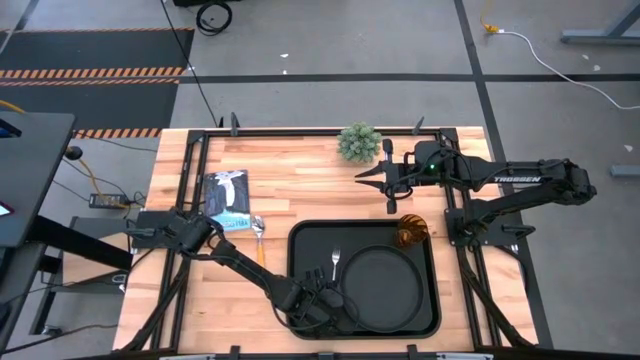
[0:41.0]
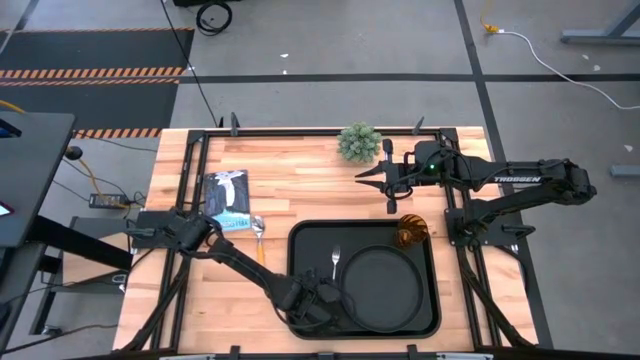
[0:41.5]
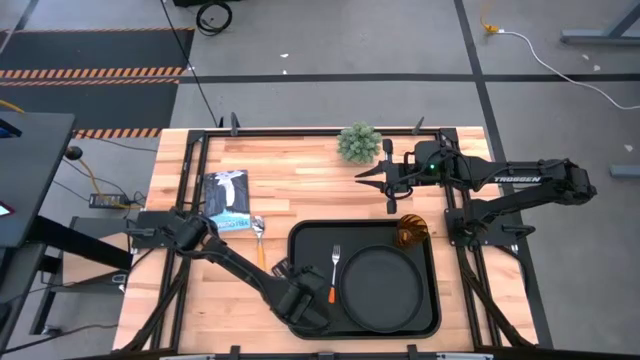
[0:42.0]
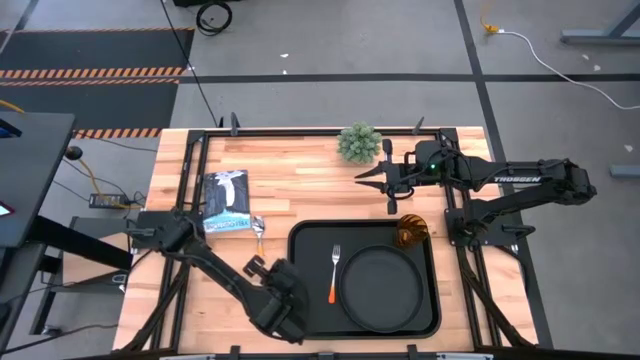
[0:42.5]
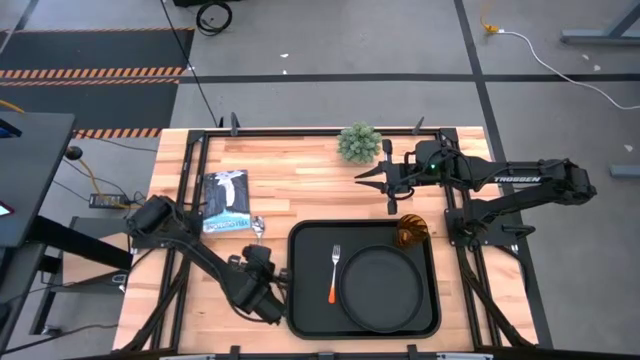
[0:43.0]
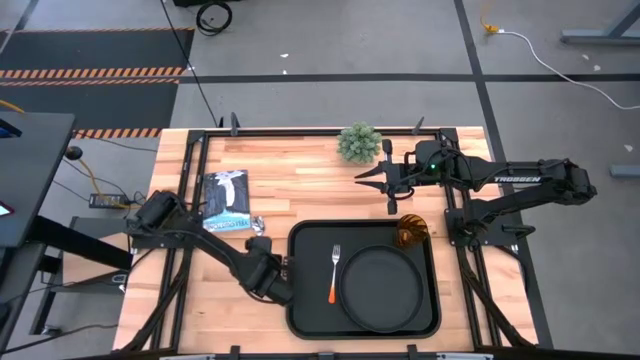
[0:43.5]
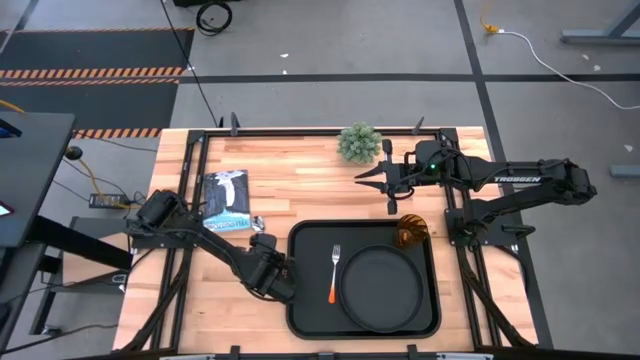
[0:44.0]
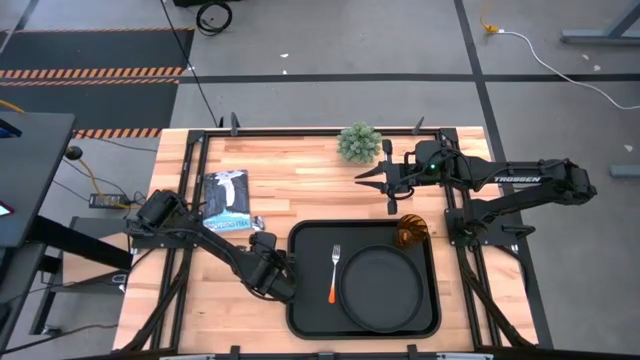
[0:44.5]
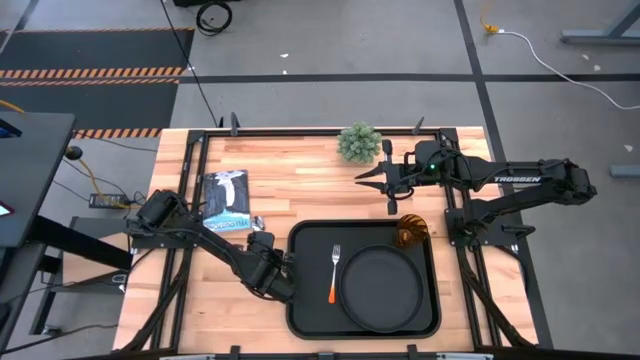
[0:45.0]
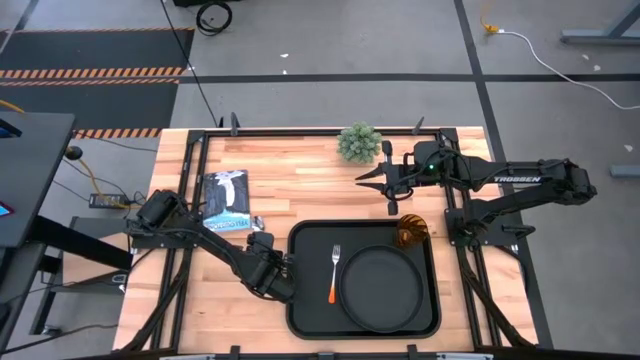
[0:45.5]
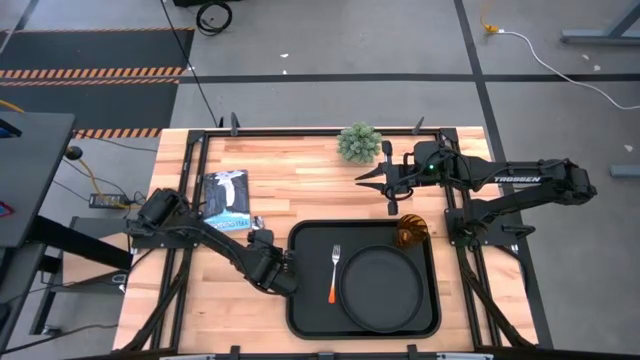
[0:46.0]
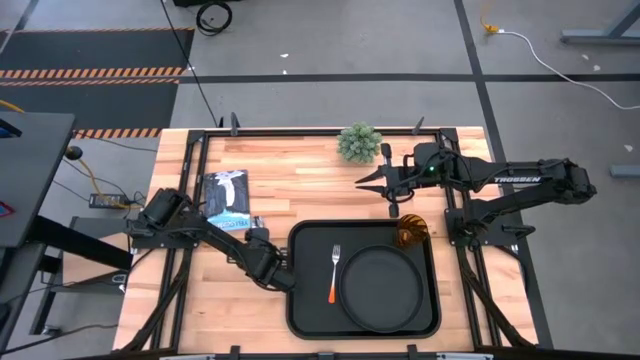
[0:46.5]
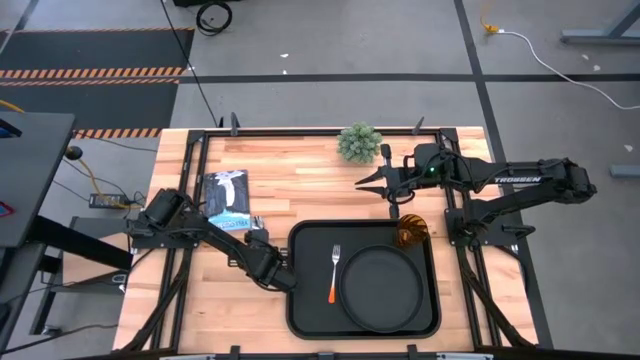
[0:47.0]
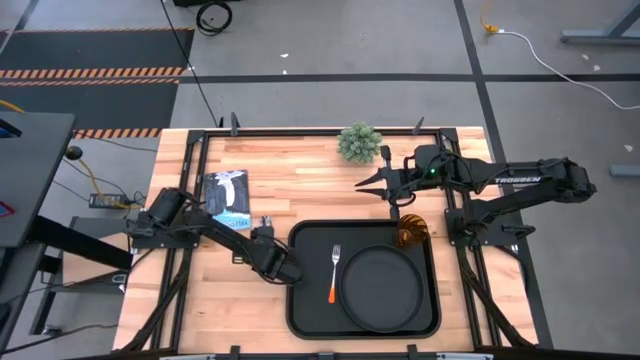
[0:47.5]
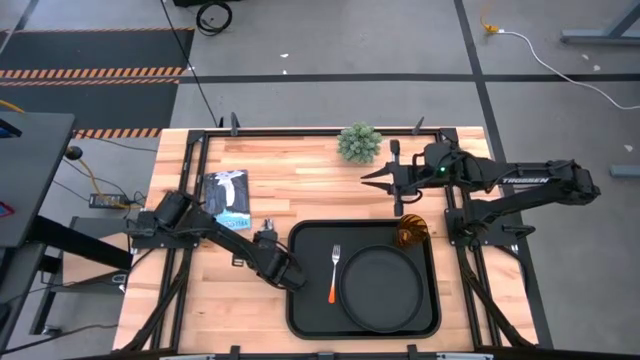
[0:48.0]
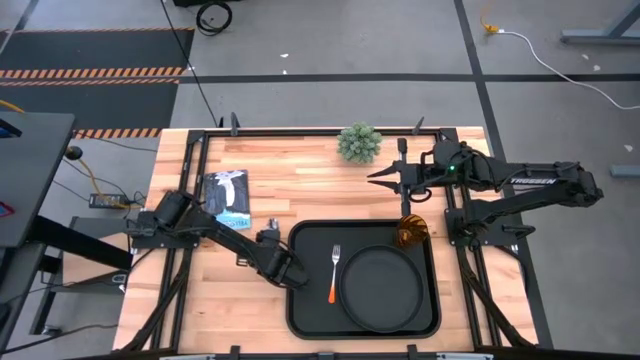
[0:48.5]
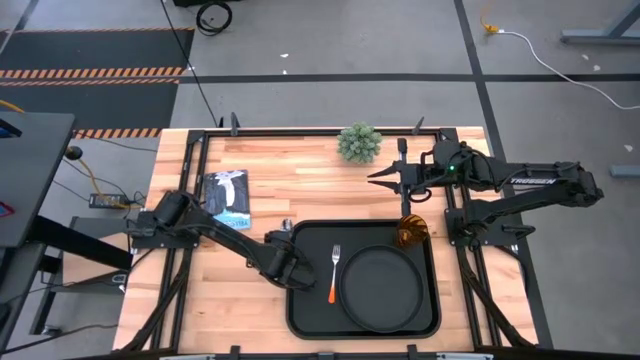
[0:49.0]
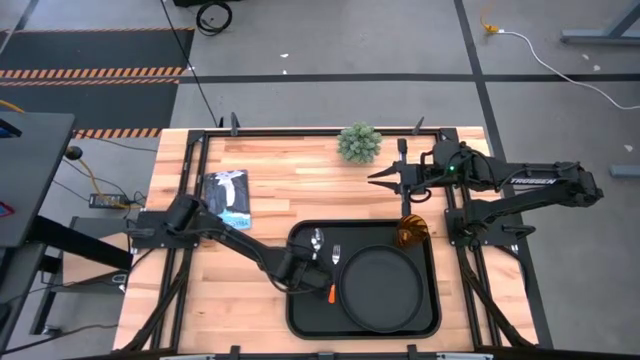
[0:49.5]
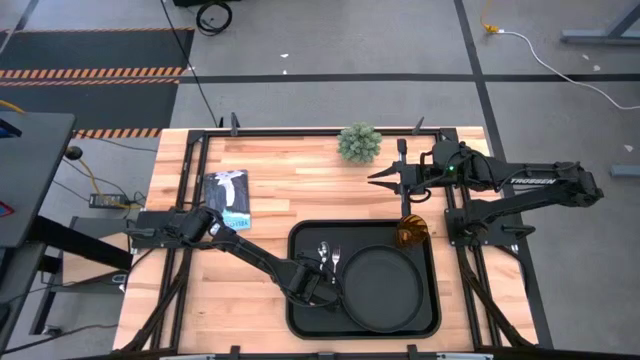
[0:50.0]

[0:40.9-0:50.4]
Task: Pick and place plate/cup/fork/spoon on tray
Put the orange spoon on the black tray to the left of the orange fork

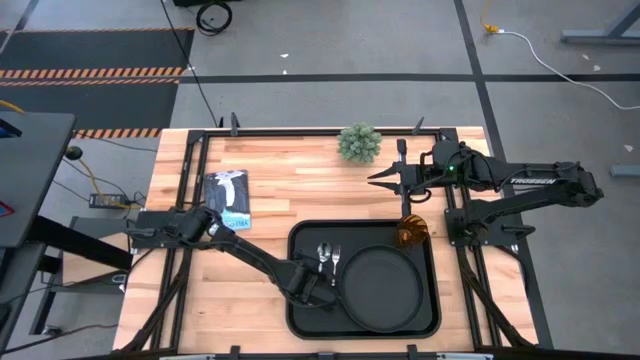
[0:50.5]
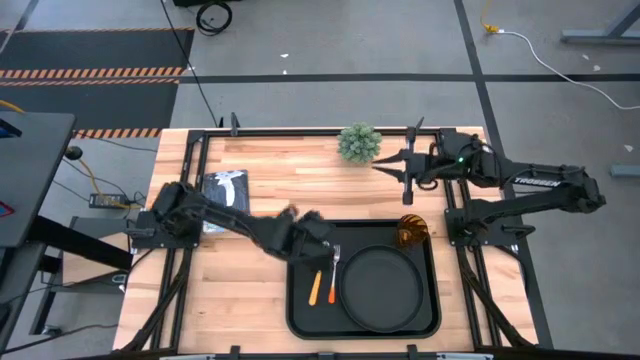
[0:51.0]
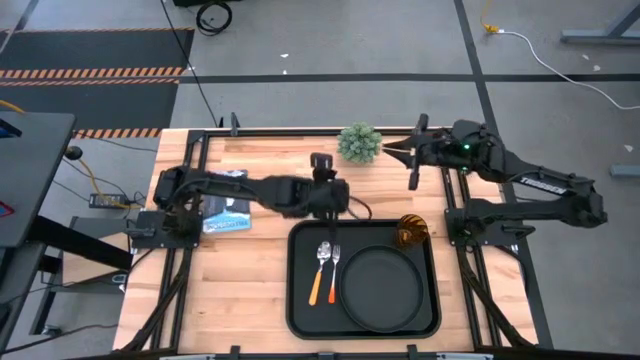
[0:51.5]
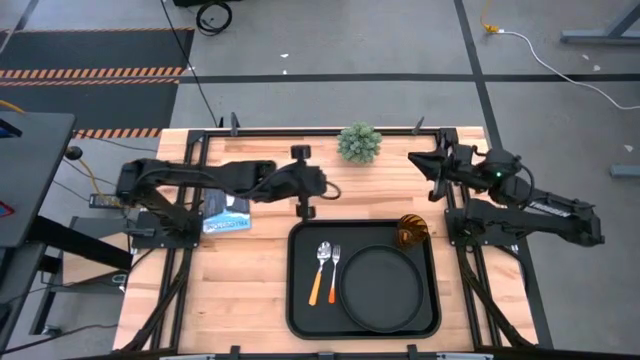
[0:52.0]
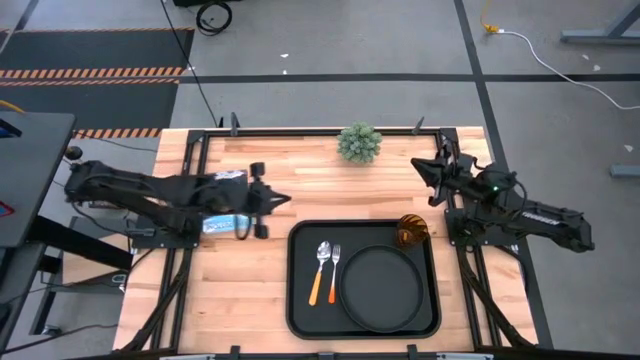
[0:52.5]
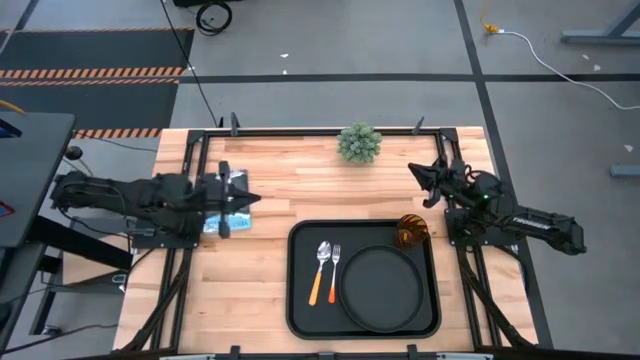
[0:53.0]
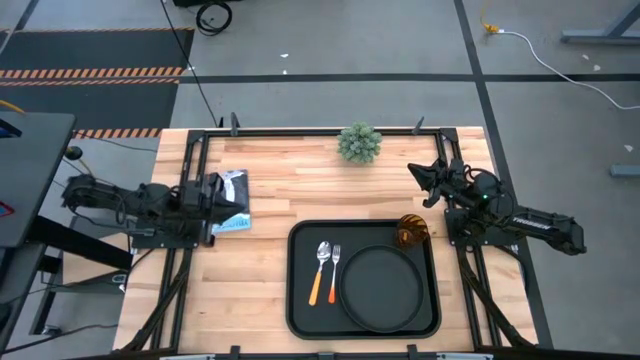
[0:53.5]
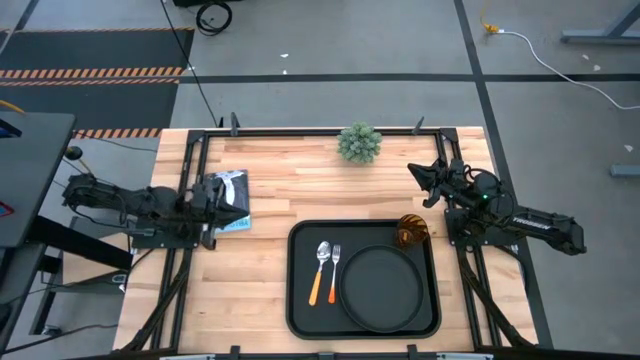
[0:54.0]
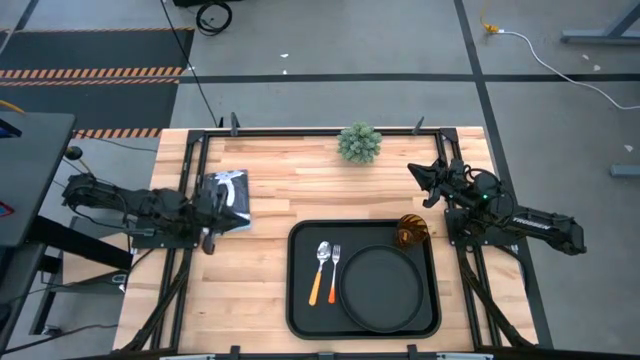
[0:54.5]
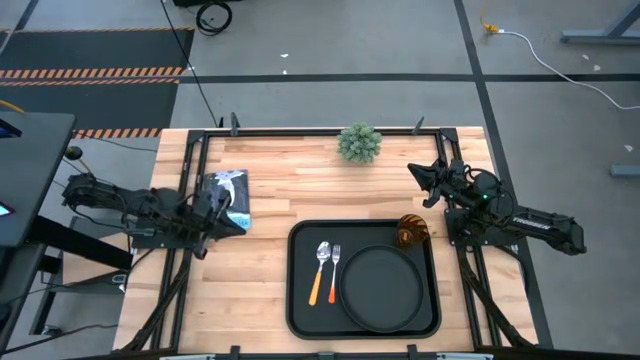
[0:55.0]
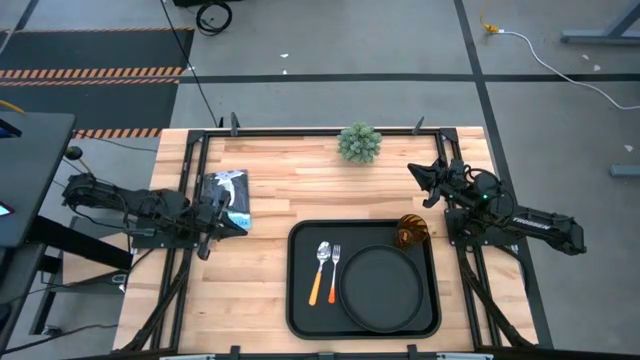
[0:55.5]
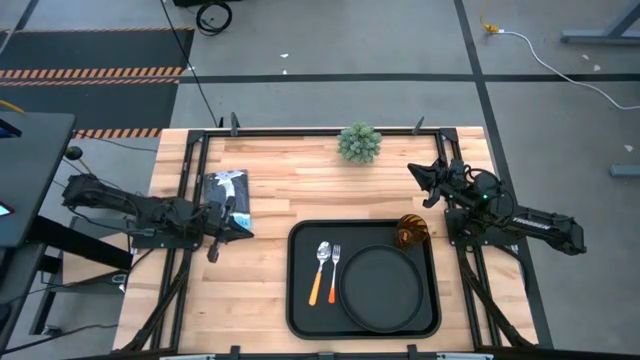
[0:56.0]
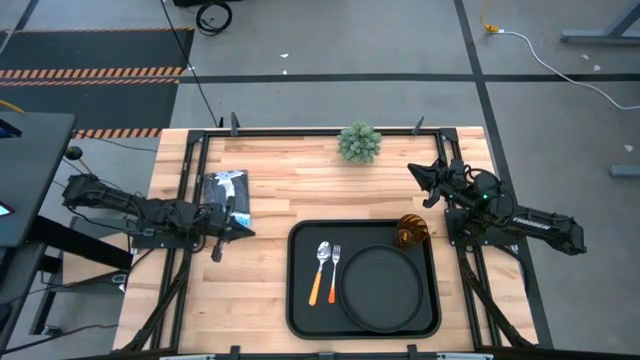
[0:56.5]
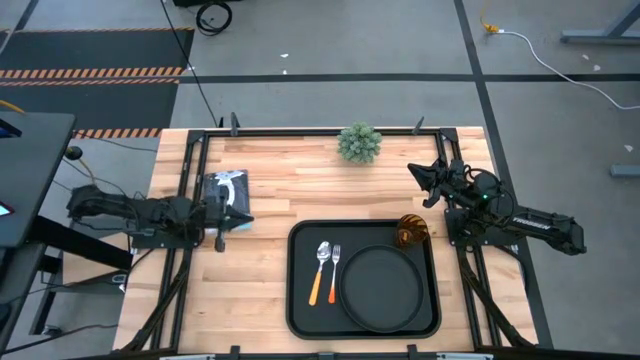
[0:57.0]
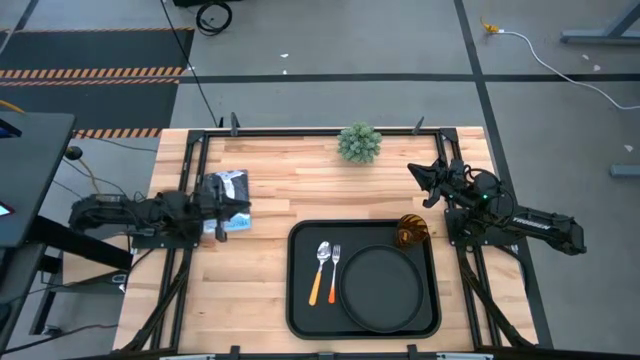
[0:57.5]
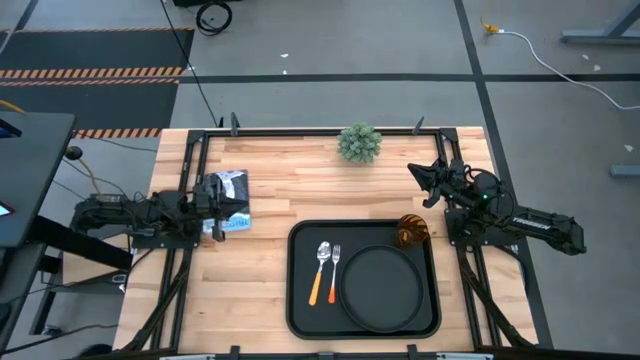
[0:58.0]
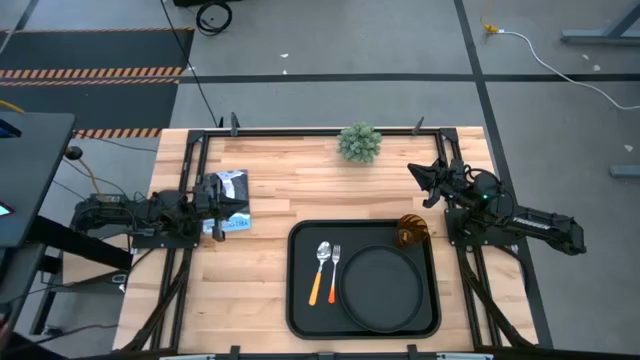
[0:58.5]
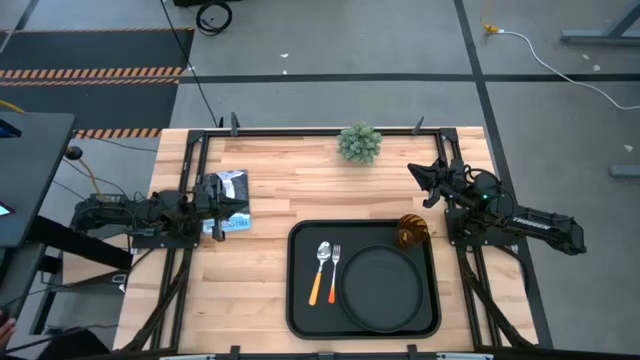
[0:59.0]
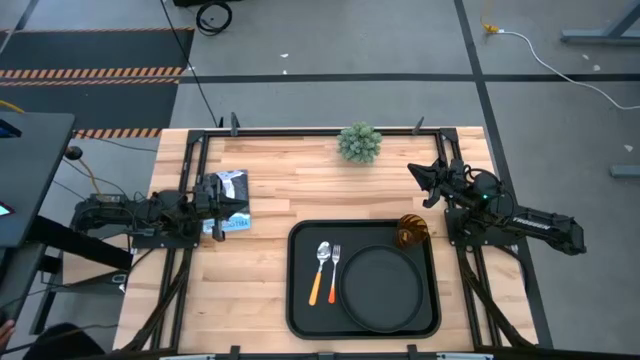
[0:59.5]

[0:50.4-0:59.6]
Return to Home Position

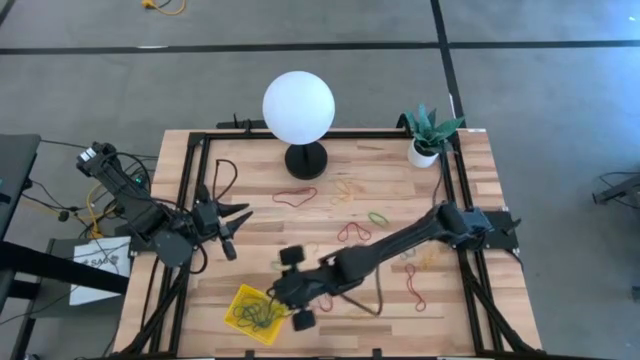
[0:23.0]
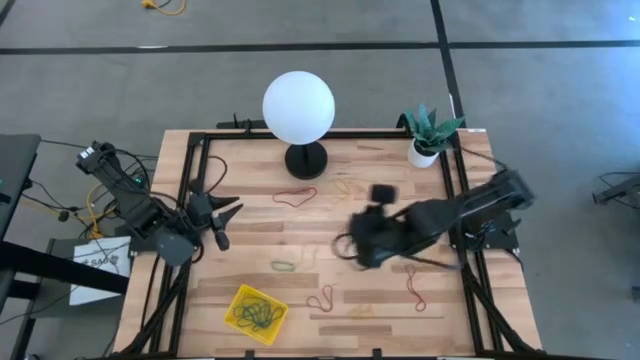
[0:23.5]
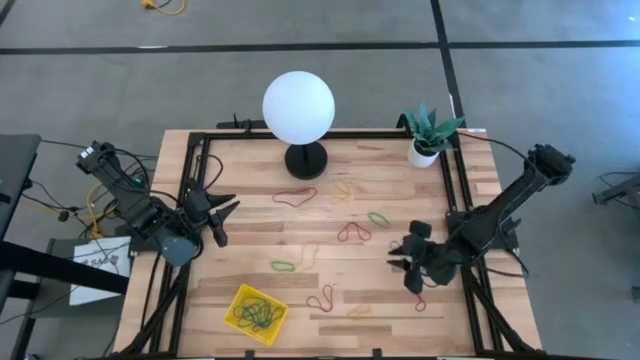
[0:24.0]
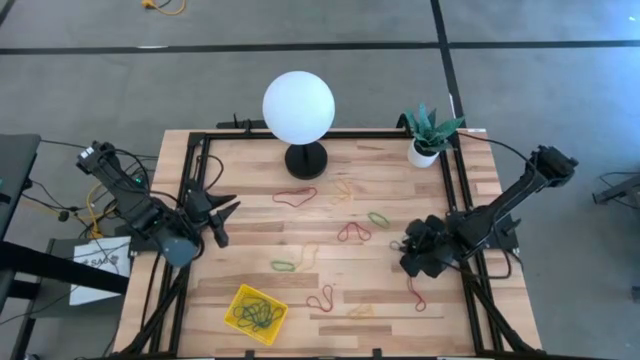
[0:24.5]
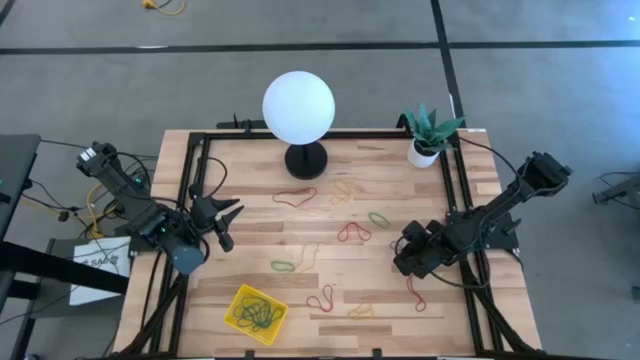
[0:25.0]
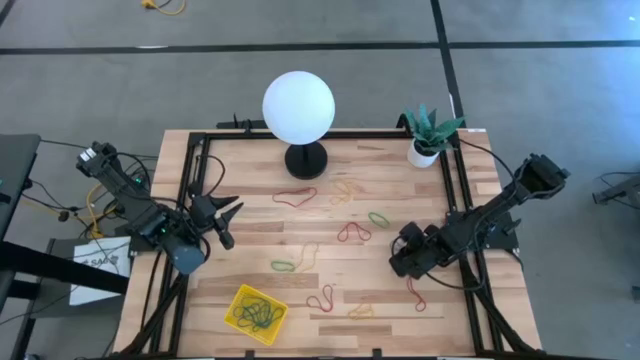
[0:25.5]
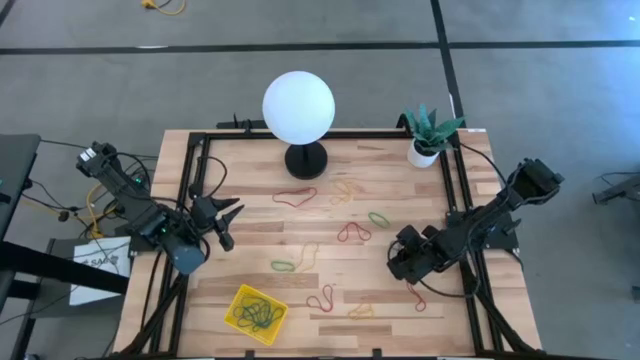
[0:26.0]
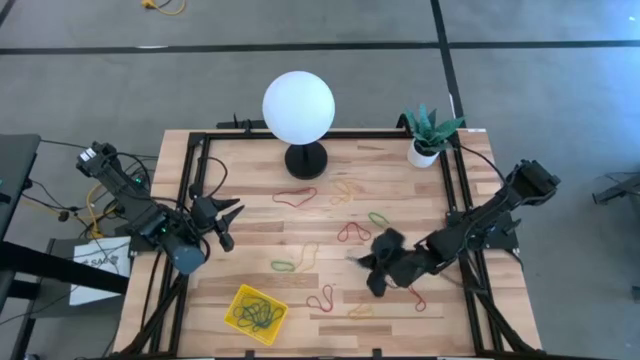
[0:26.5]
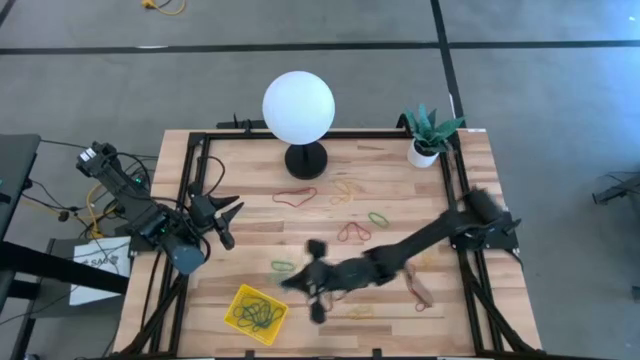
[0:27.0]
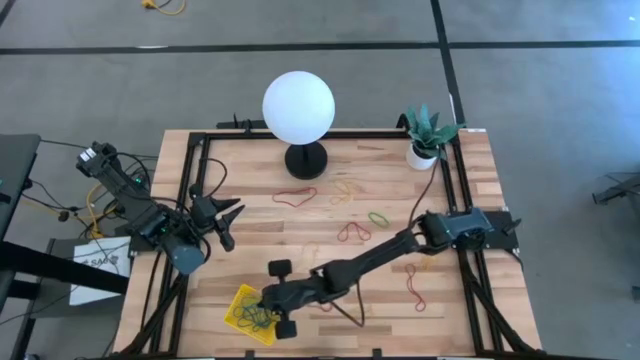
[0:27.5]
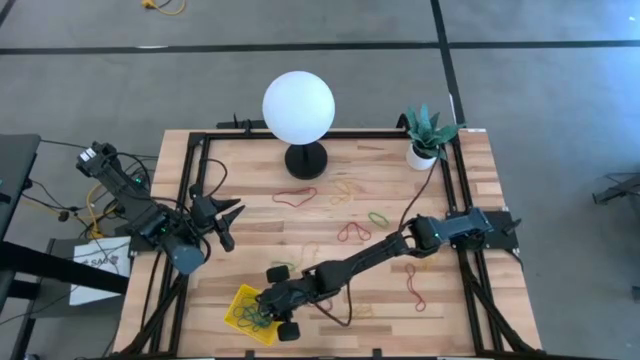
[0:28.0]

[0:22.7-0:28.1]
Task: Pick and place items into bin
Put the blue rubber band into the yellow bin
